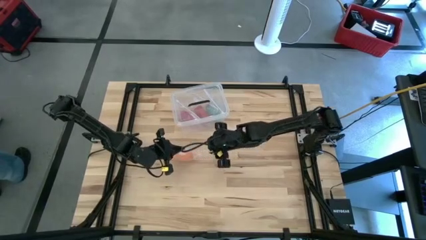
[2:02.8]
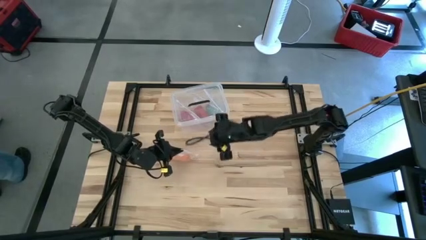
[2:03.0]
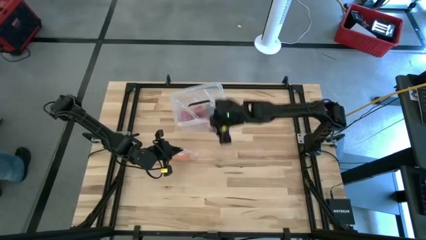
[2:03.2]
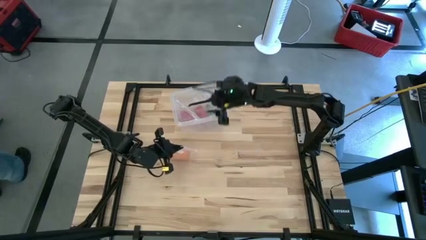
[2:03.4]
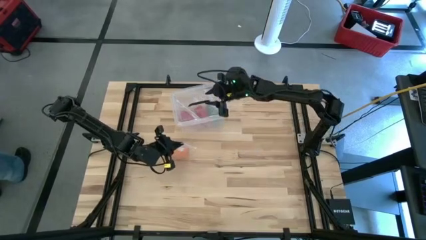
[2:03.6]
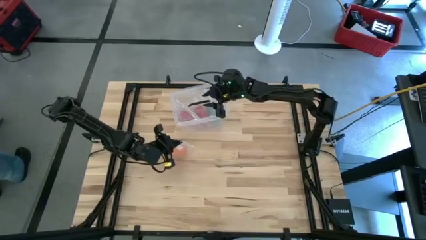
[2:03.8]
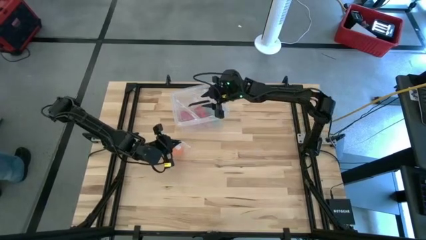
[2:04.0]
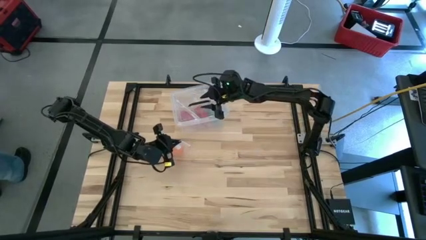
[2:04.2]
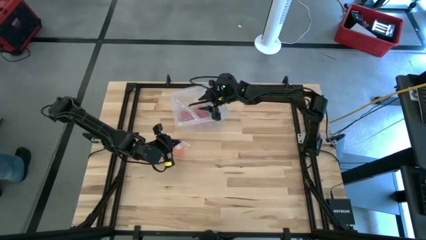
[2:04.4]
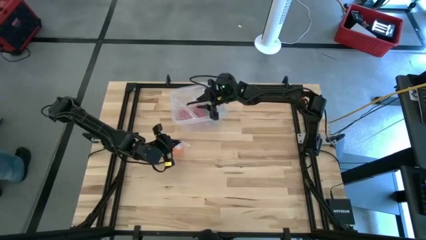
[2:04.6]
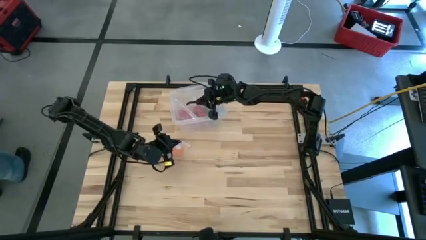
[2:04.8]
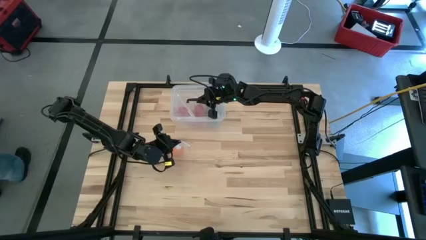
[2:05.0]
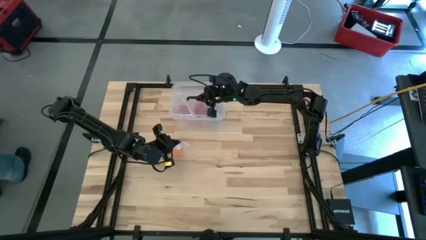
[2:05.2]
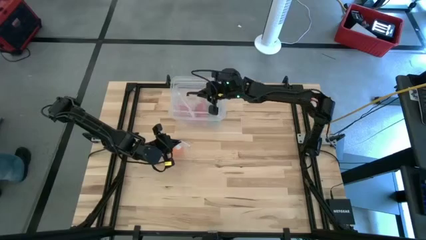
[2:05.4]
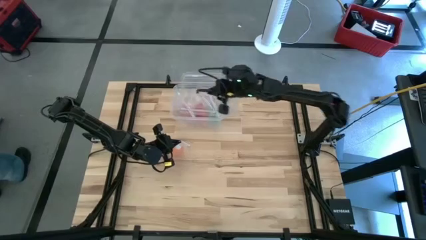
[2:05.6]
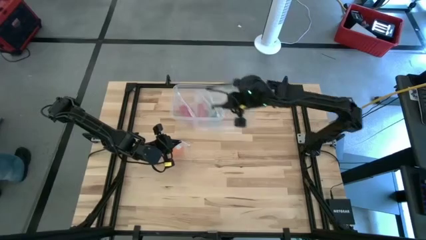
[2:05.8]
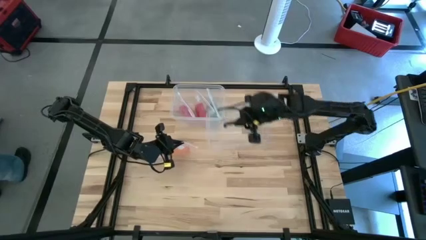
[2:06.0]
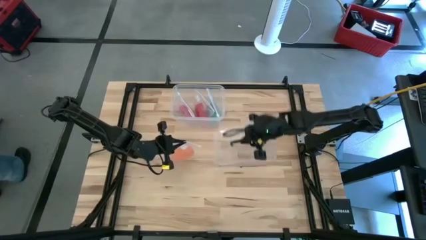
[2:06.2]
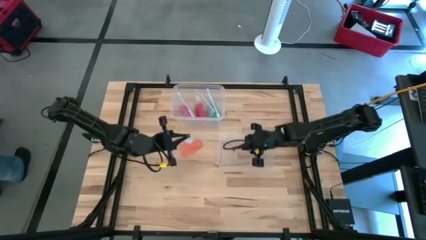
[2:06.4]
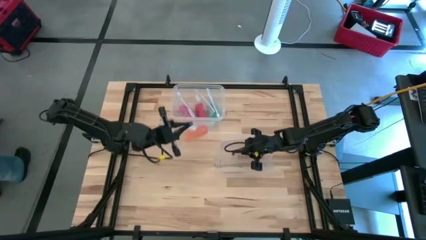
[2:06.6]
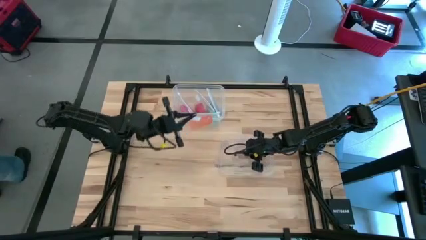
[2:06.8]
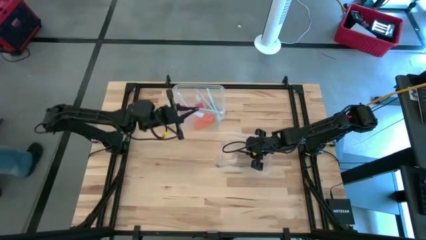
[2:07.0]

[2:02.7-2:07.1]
Task: Roll bandage
Open the transparent bin

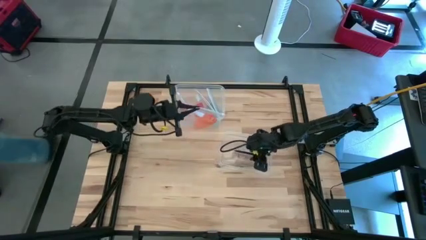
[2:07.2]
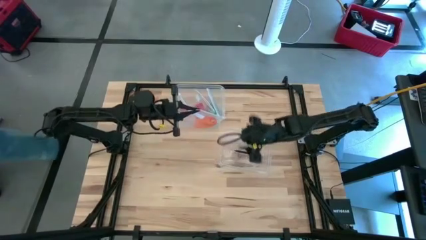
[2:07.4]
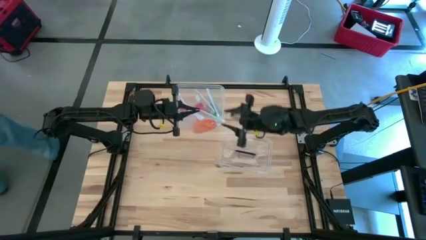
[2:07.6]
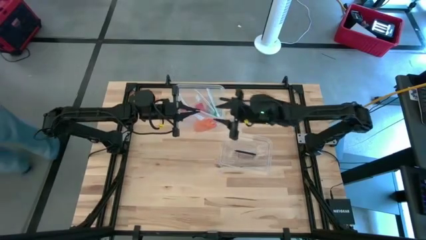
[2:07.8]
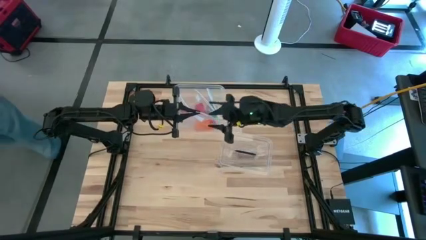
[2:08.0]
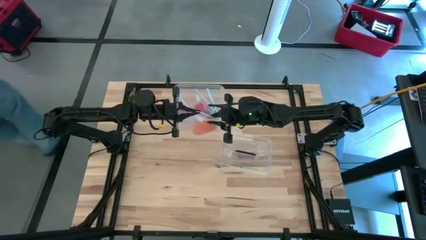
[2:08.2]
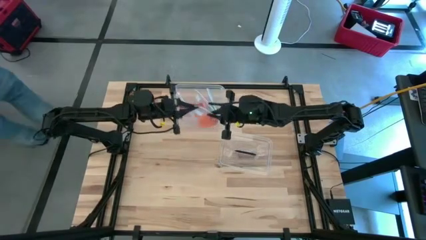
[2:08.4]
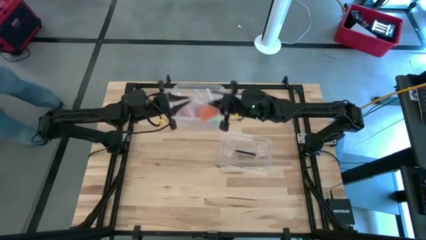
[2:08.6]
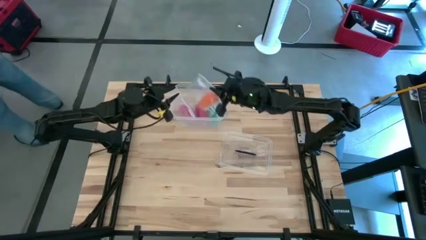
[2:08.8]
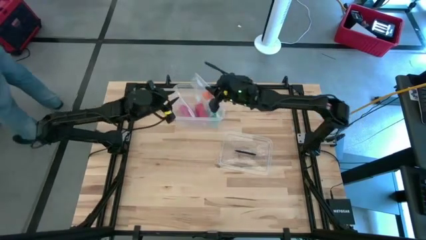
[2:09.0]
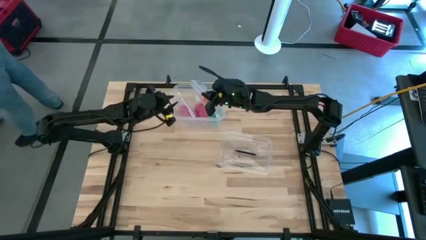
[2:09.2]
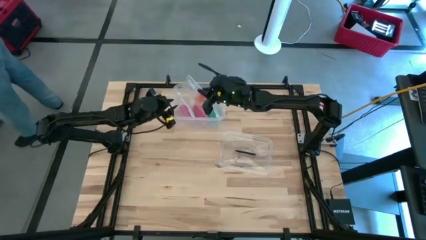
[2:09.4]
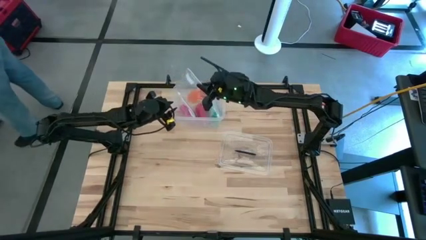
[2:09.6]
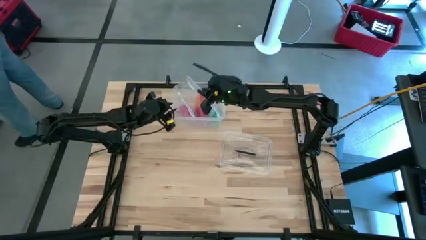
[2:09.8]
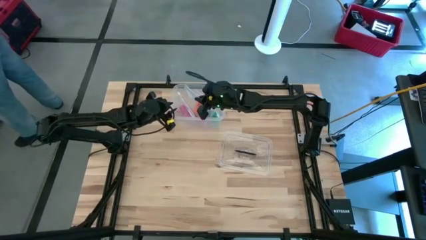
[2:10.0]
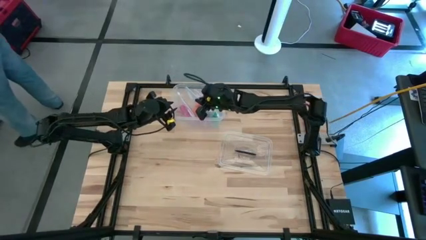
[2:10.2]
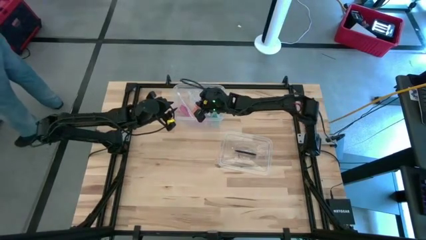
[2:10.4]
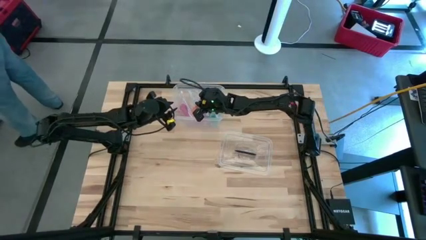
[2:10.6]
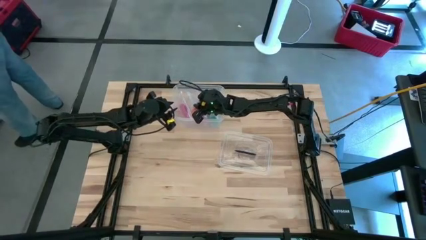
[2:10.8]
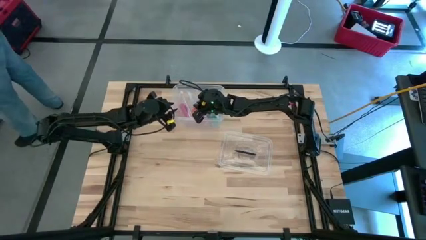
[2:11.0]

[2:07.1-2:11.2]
Put the packed rolled orange bandage into the transparent bin

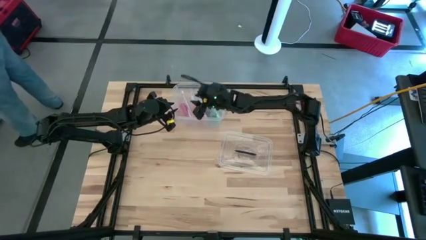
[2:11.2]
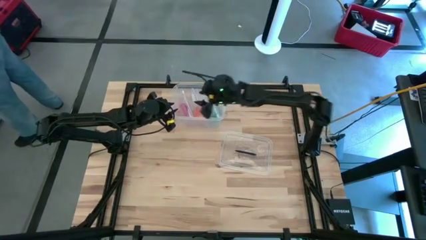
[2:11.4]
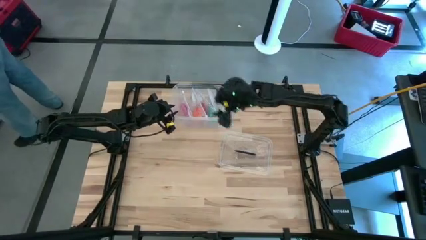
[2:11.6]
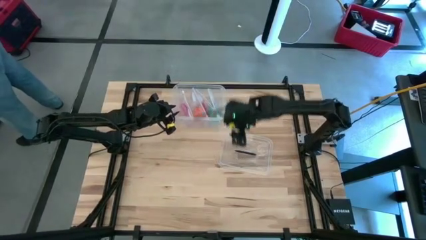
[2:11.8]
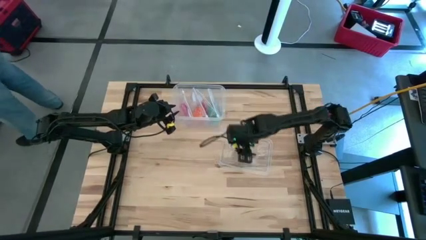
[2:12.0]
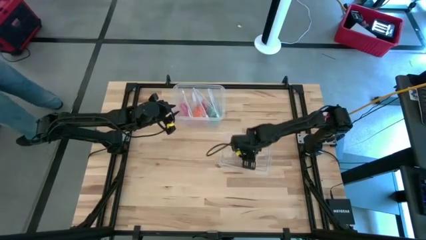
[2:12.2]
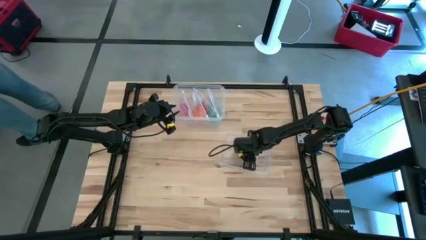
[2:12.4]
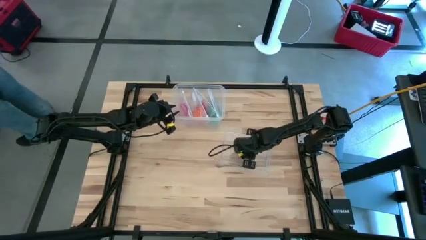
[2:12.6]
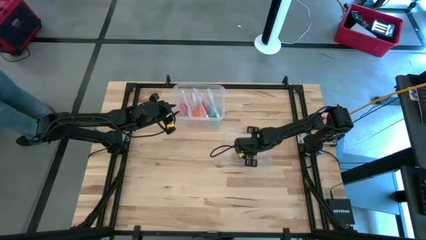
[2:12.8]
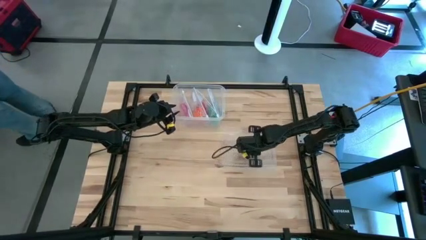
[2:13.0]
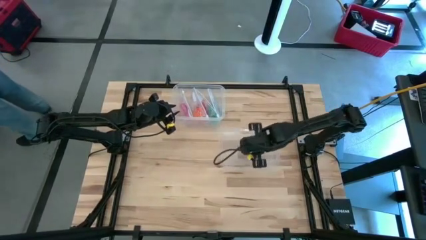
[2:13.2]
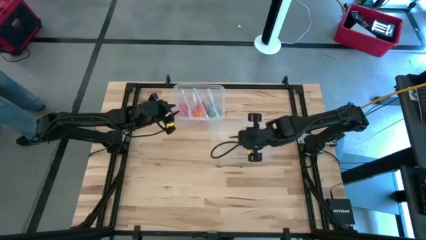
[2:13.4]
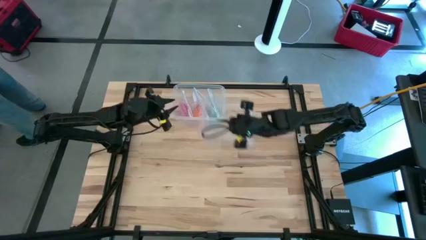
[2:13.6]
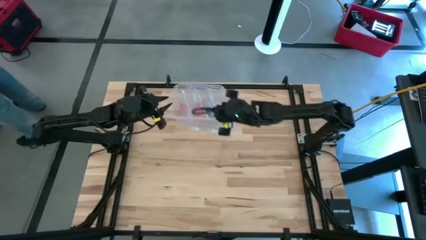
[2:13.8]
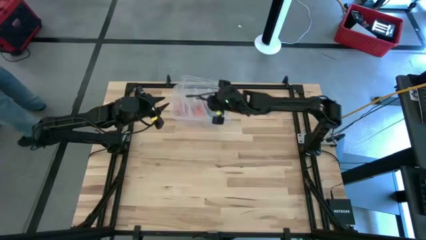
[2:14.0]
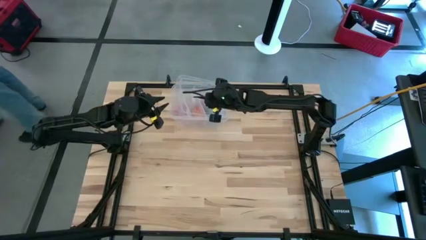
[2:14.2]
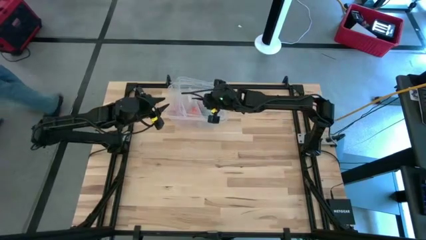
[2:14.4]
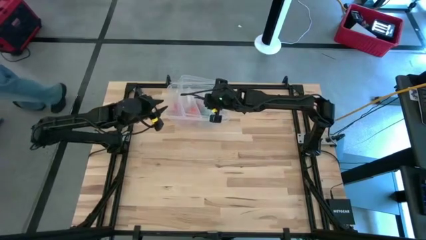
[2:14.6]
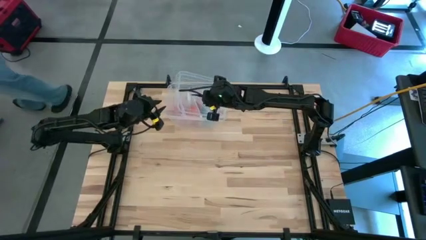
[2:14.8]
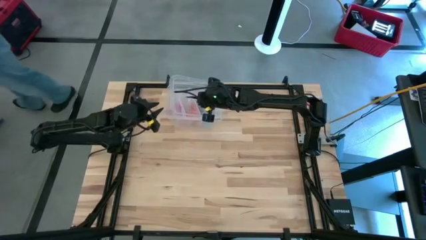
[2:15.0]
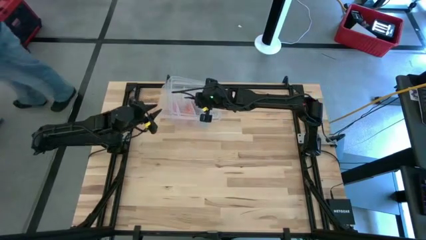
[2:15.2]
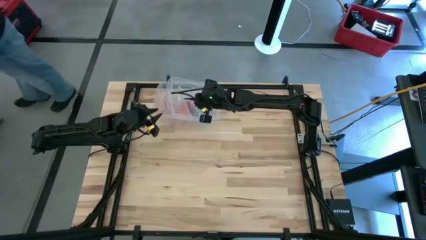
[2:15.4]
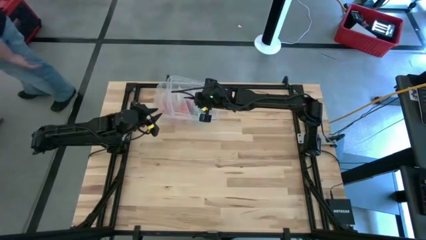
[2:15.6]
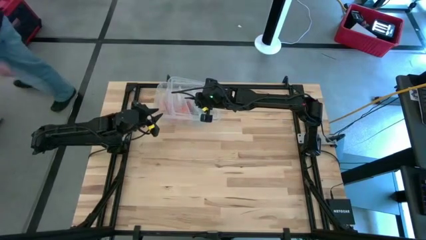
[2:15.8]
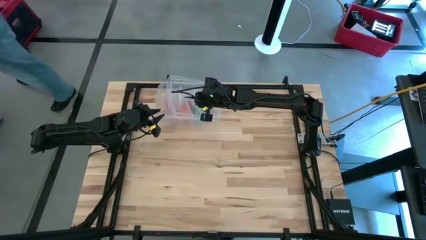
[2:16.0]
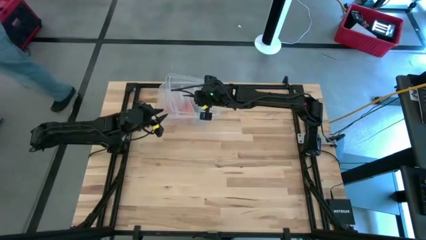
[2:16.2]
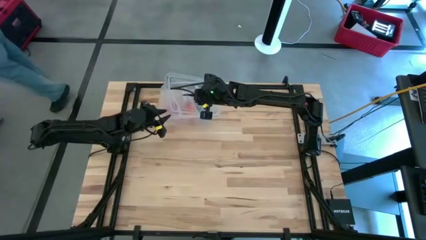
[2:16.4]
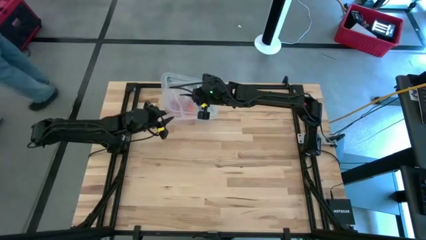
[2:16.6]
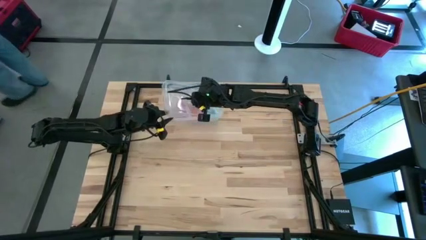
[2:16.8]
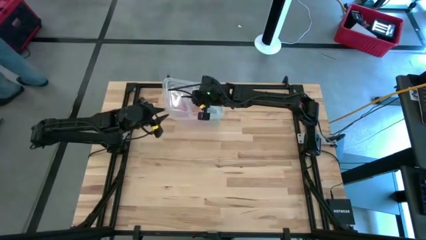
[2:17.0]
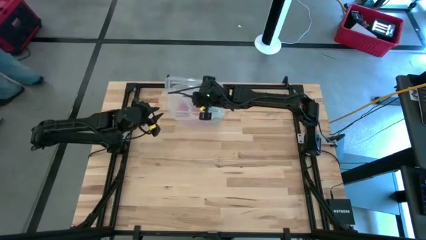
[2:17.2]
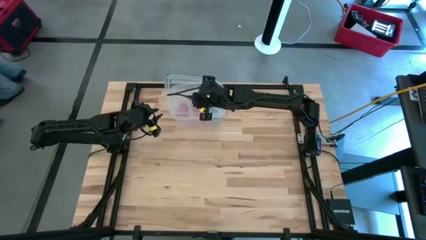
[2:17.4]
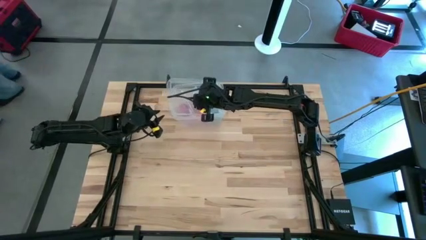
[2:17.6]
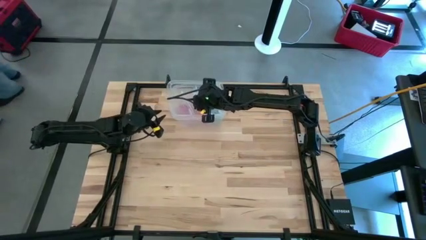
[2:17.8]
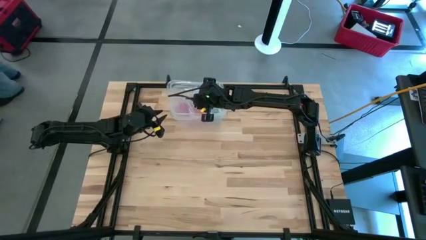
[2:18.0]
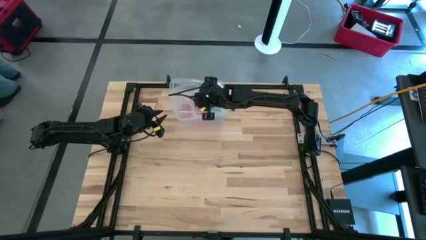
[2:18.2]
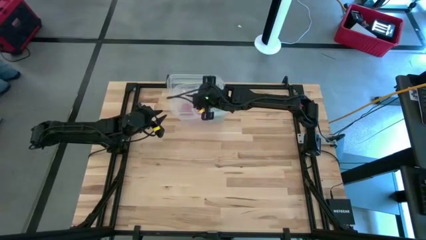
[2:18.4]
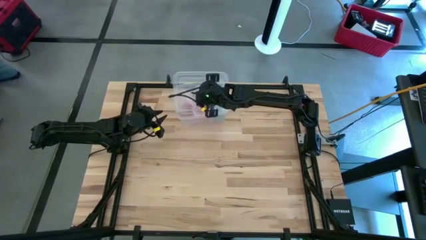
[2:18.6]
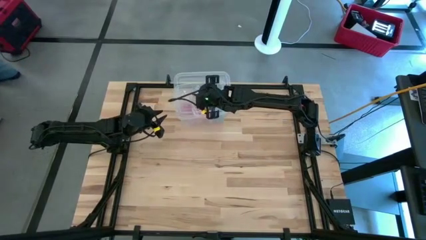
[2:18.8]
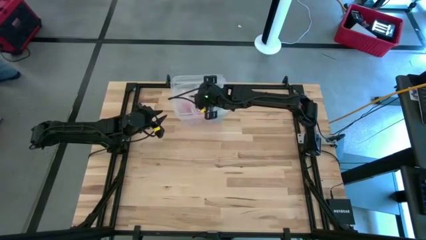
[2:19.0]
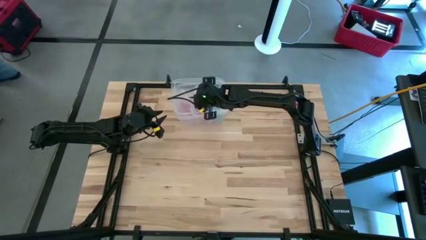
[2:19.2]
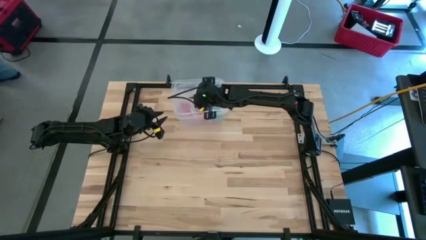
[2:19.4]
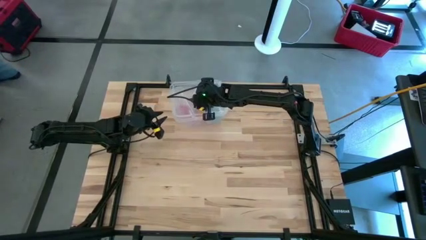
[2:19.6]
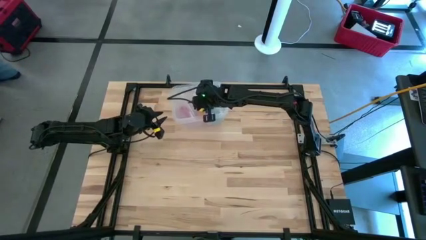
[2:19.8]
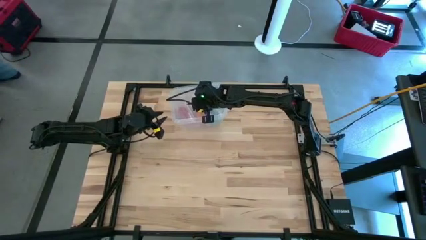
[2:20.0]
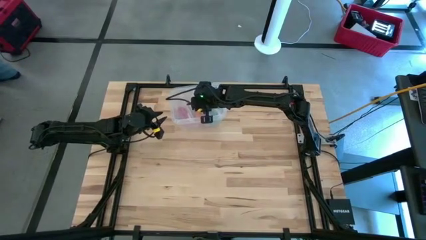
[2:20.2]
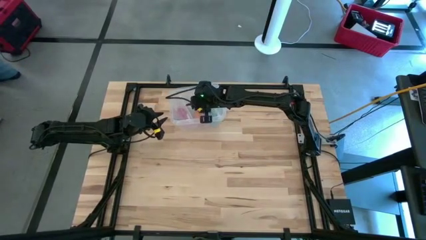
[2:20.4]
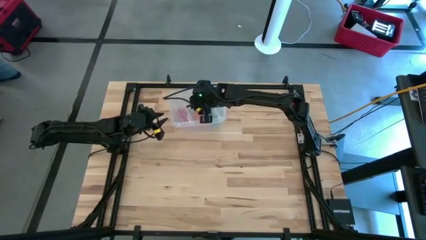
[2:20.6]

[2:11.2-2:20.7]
Close the transparent bin
